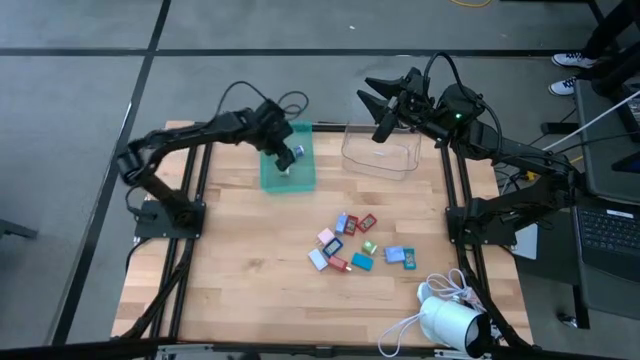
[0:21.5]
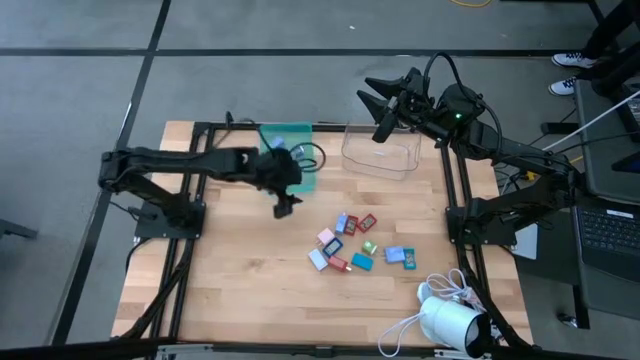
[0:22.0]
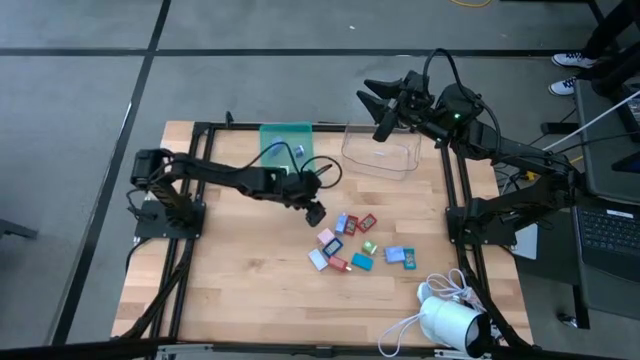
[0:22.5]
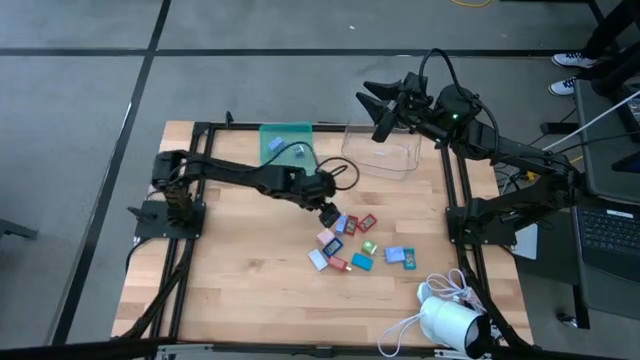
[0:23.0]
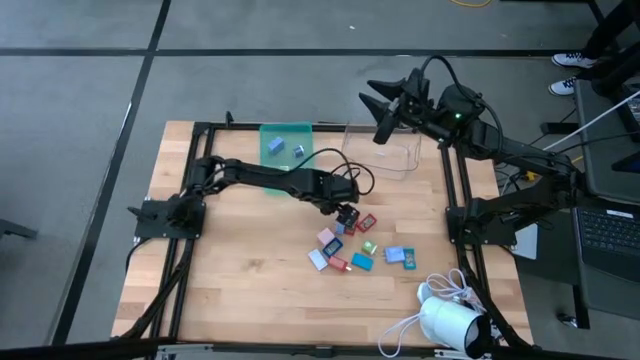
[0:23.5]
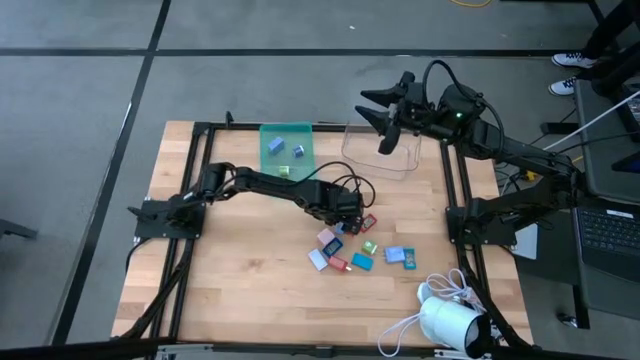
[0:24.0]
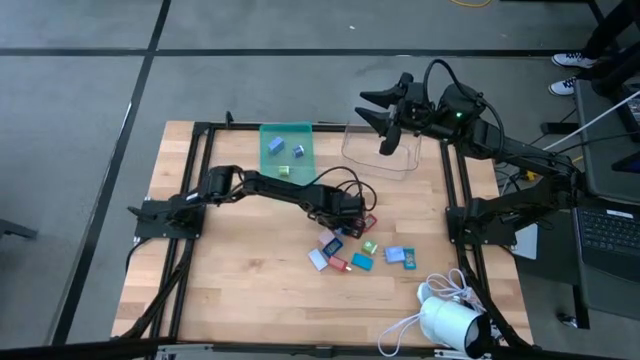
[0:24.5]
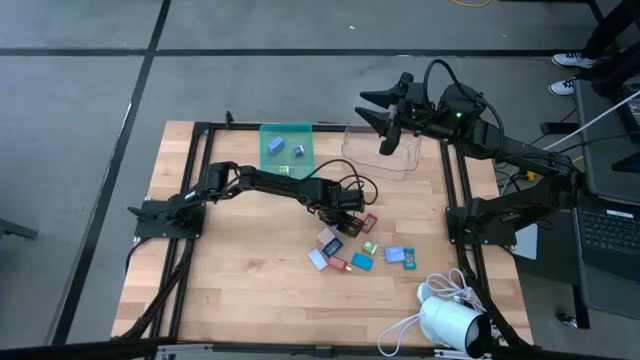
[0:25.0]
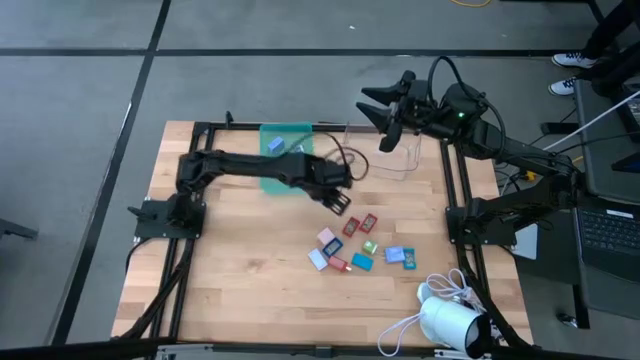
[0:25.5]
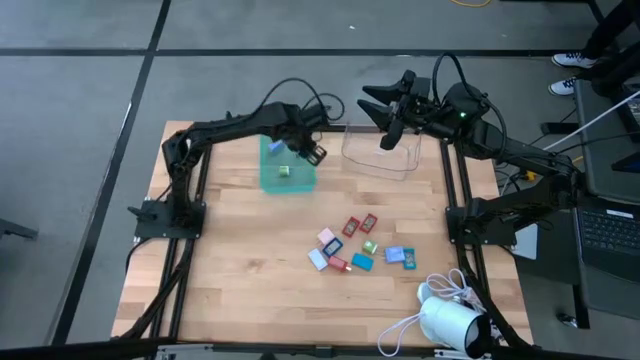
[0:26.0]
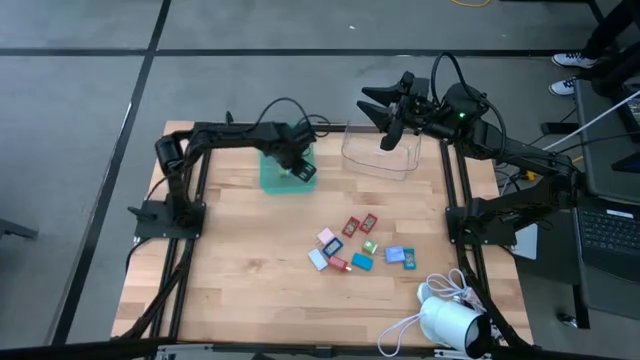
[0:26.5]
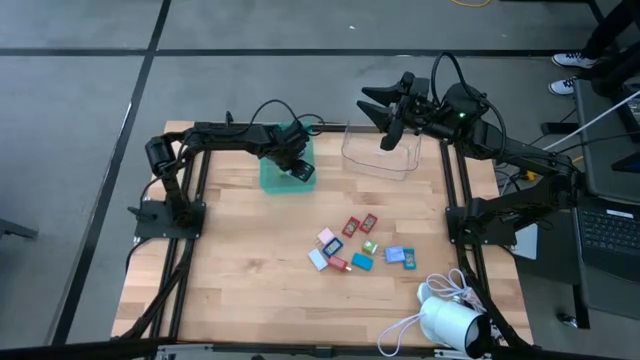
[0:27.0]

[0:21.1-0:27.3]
Task: Pick & Place Office items
Put the left light blue charger adapter into the green bin

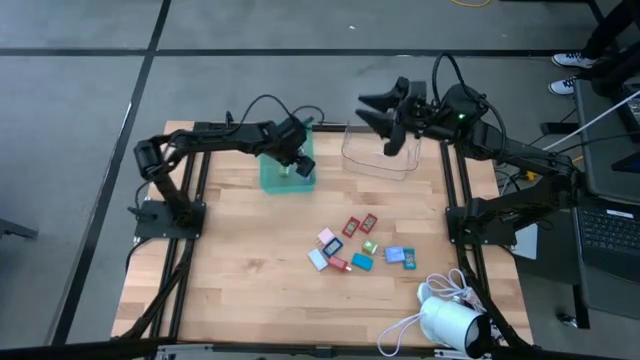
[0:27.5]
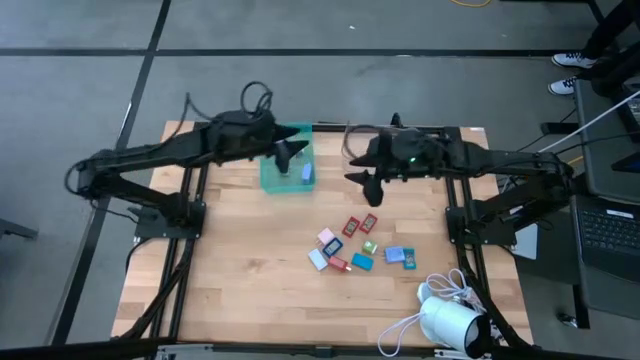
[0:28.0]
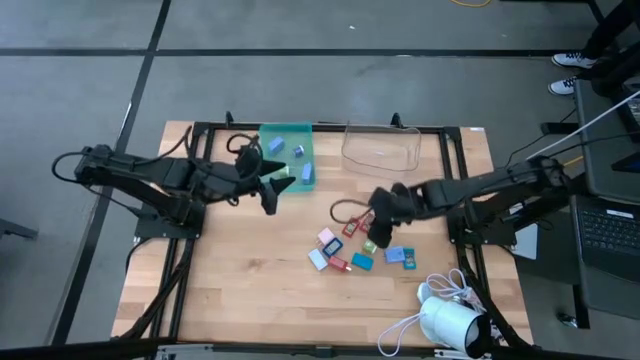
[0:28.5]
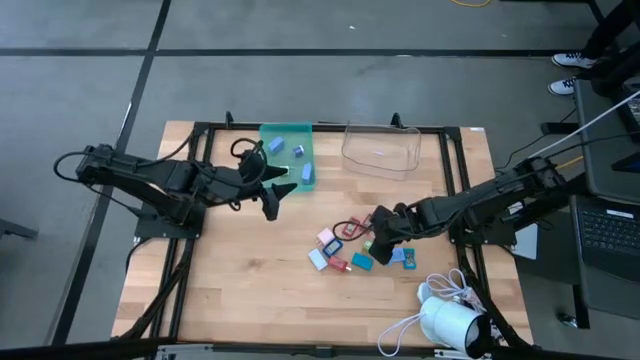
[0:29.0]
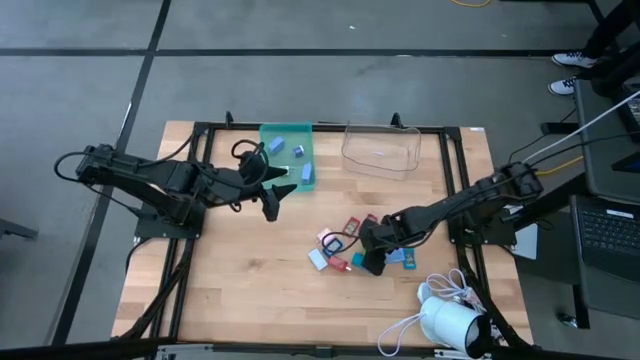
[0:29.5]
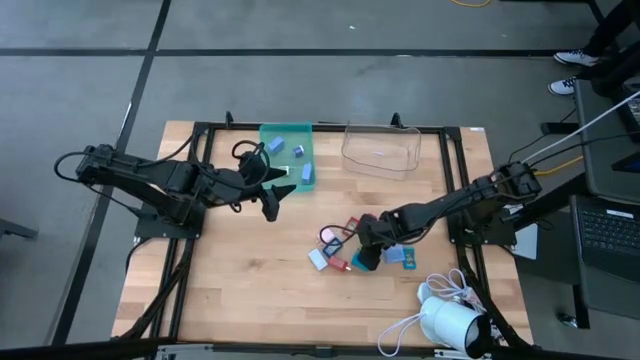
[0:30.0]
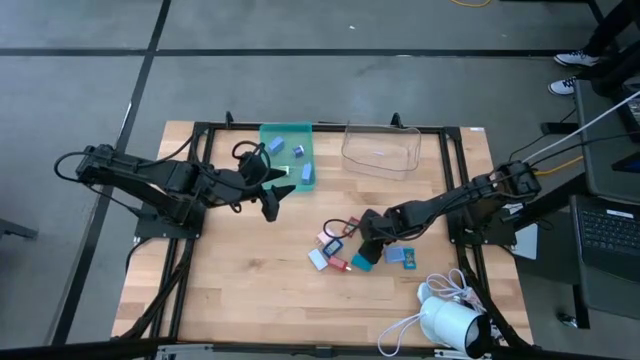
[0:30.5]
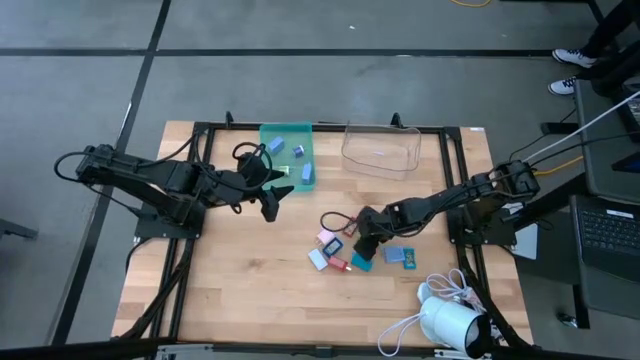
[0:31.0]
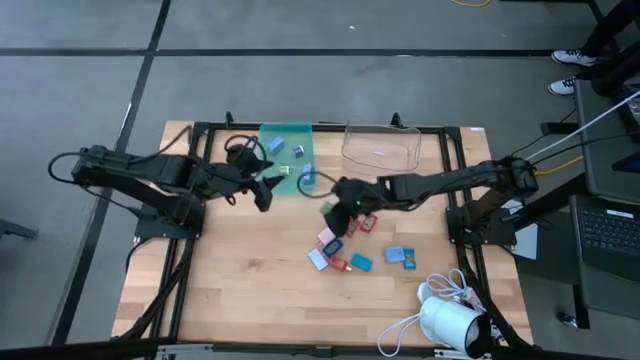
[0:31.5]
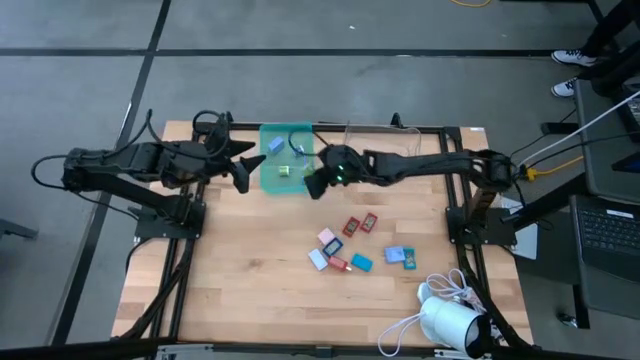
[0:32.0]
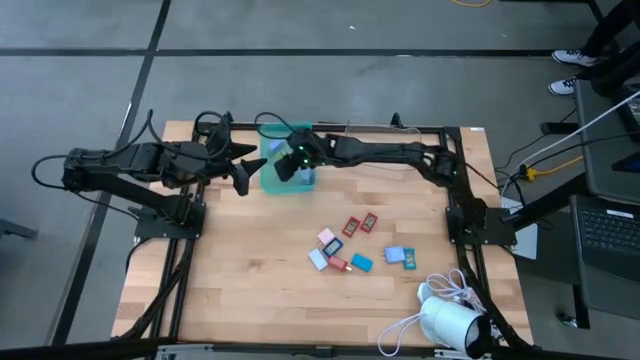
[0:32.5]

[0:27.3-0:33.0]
Put the green charger adapter into the green bin

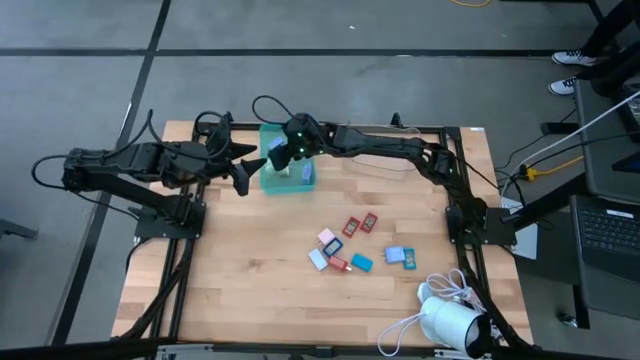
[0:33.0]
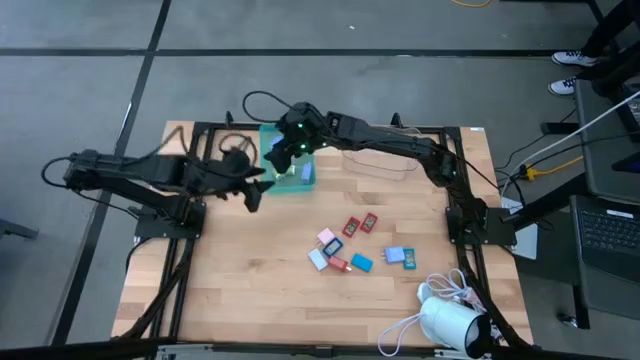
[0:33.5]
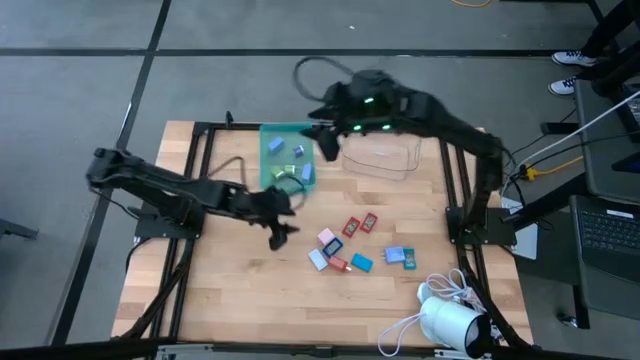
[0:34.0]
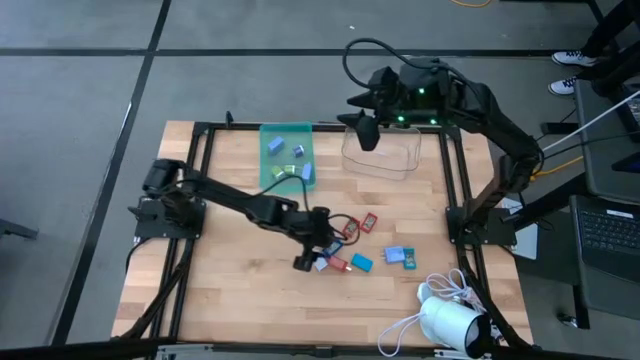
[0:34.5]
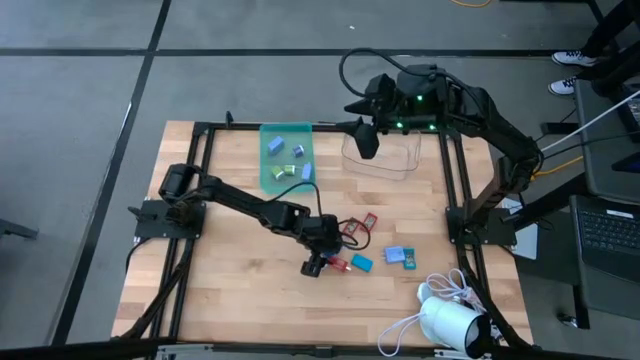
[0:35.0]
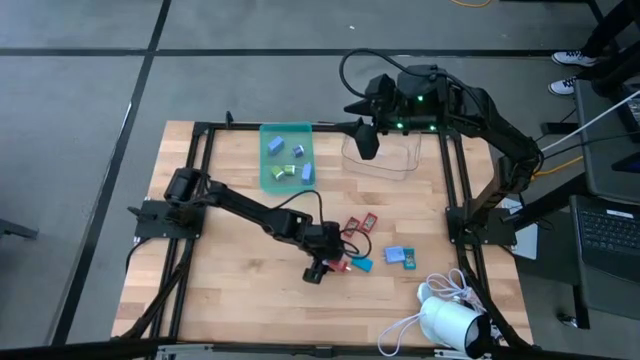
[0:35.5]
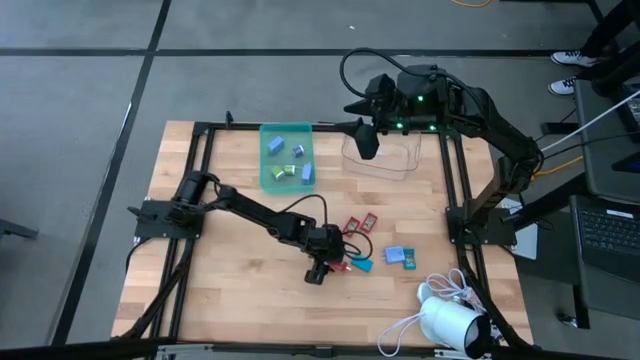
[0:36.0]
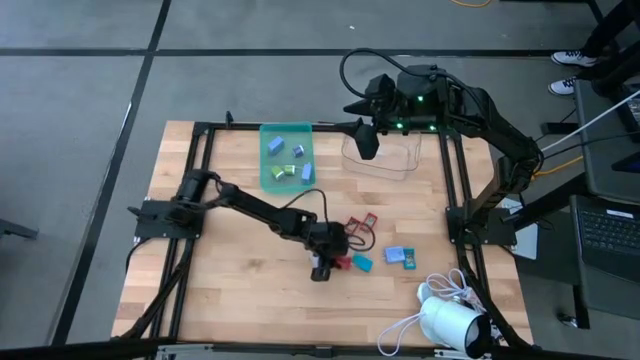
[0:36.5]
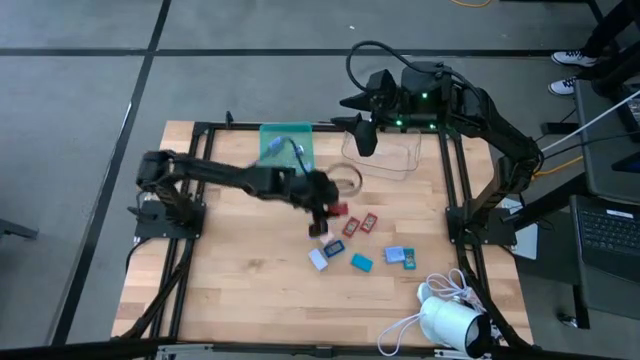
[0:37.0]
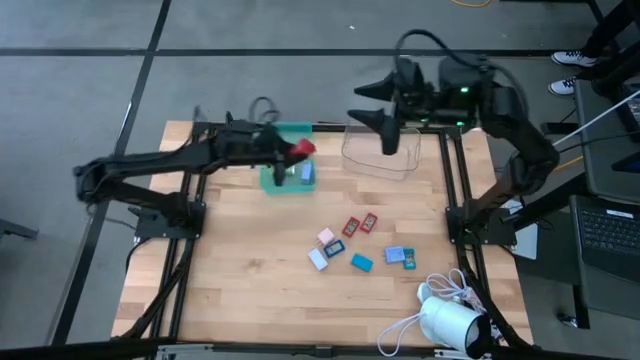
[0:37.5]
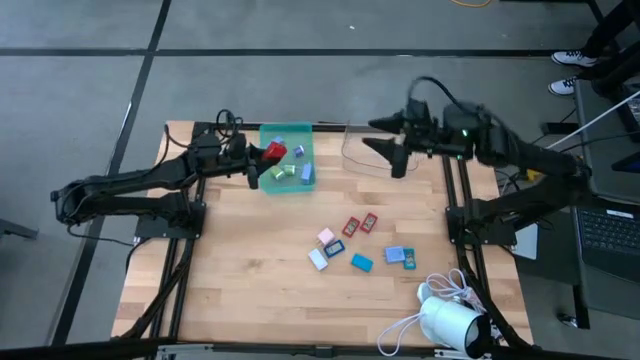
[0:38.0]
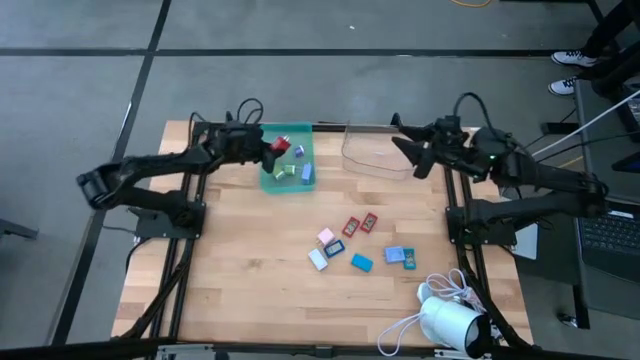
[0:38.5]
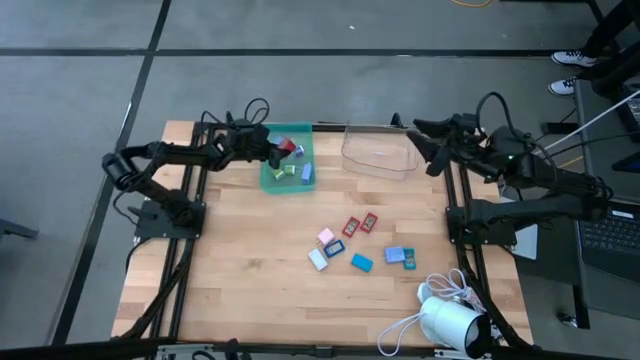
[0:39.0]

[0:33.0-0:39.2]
Put the red charger adapter into the green bin

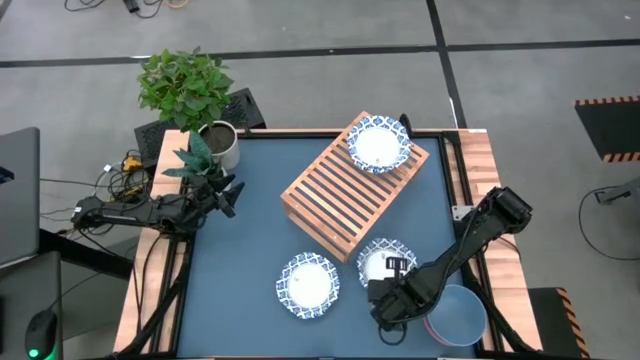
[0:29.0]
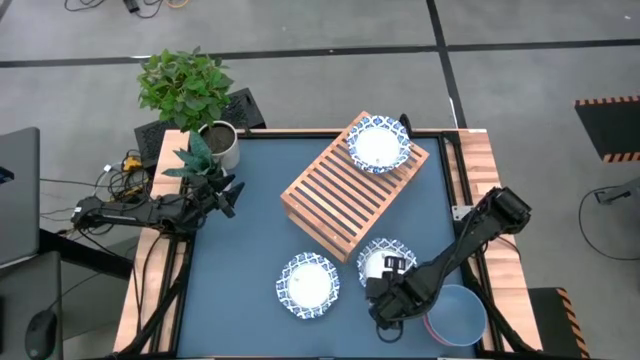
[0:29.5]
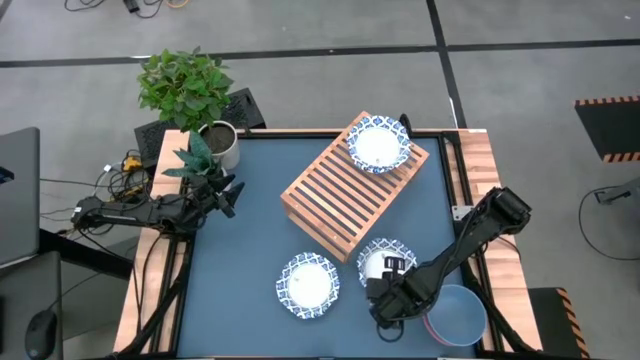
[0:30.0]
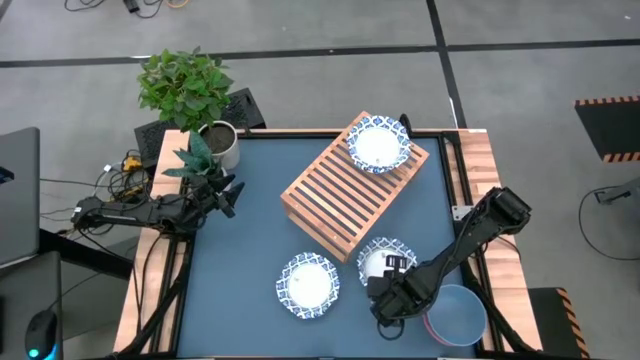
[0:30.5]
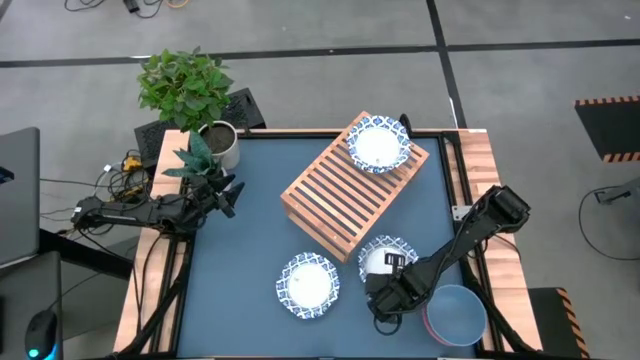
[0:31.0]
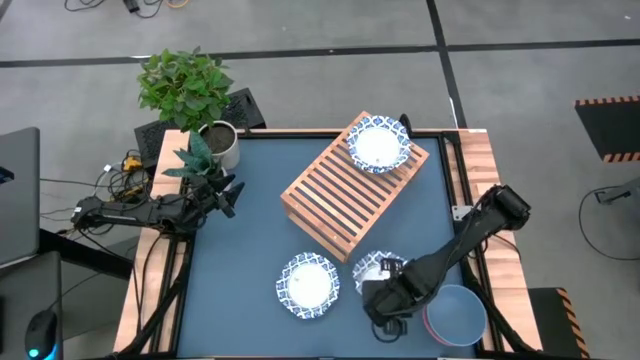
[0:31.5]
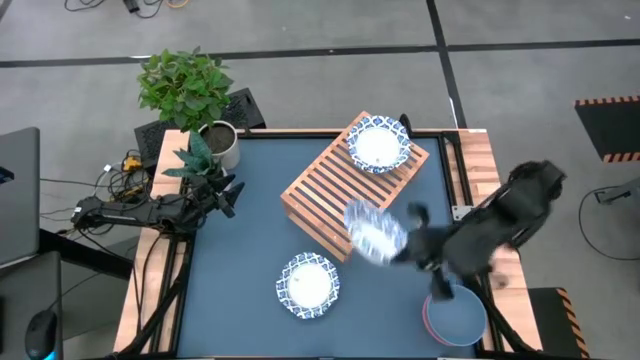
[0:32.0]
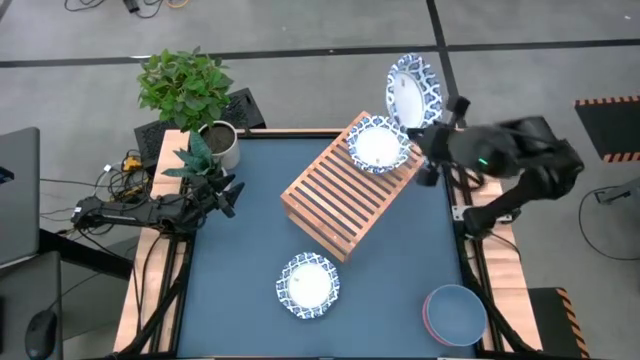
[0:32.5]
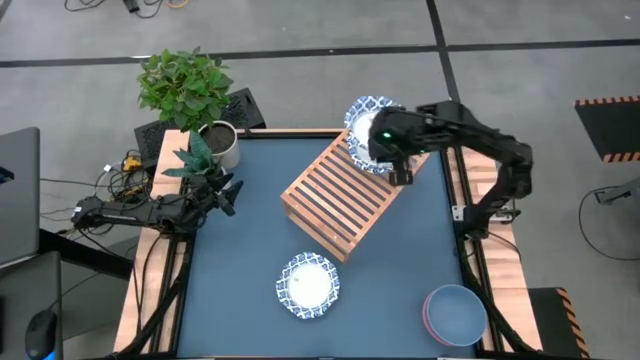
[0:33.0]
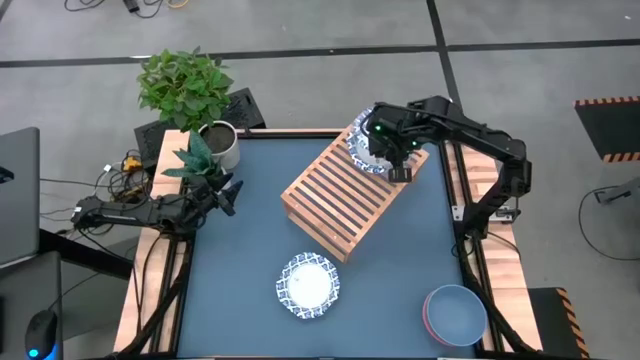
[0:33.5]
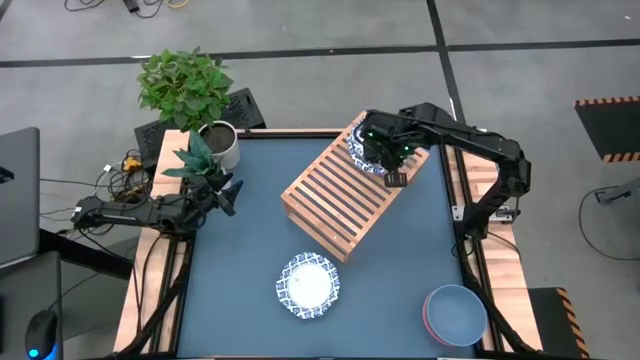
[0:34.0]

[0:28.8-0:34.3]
Task: Place and stack bowls onto a shelf
Stack the right white and blue patterned bowl on top of the other white and blue patterned bowl on the shelf
